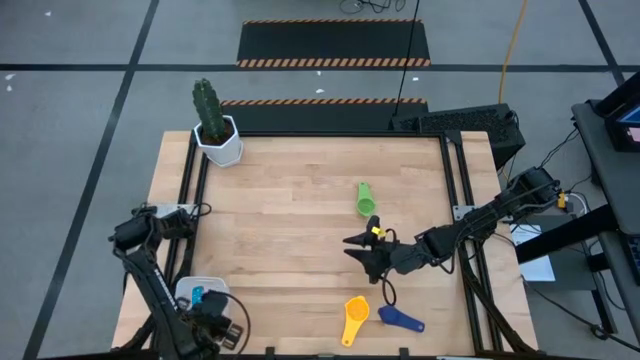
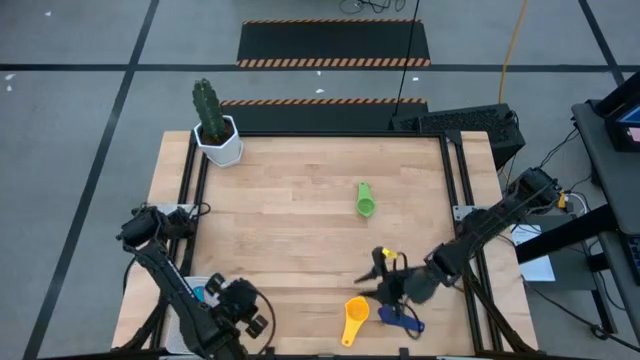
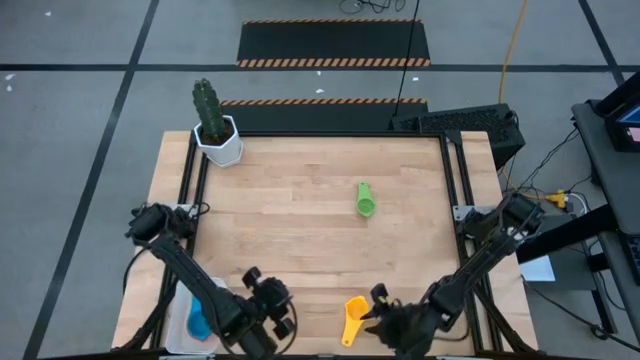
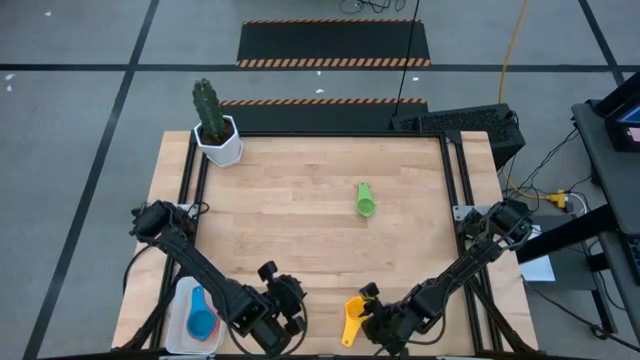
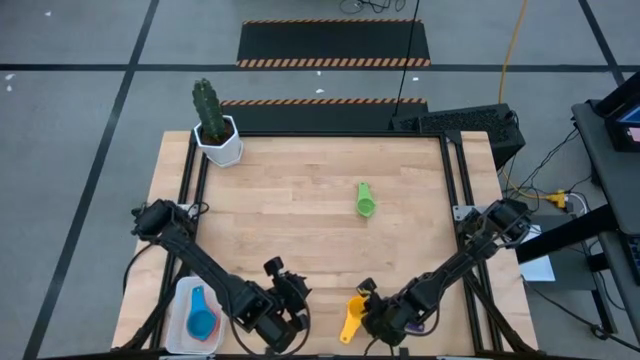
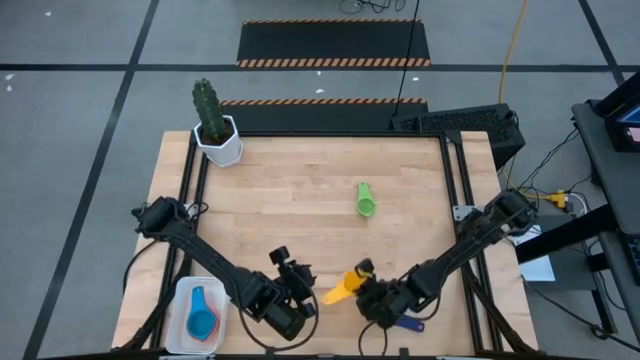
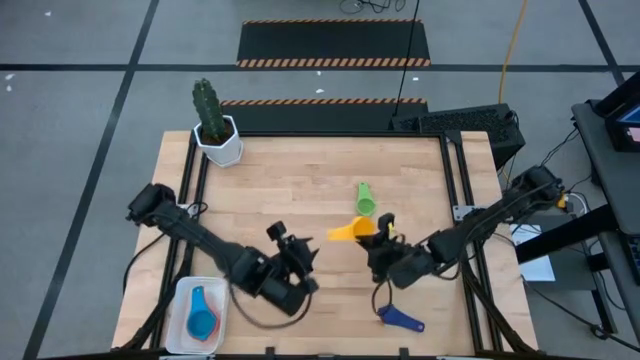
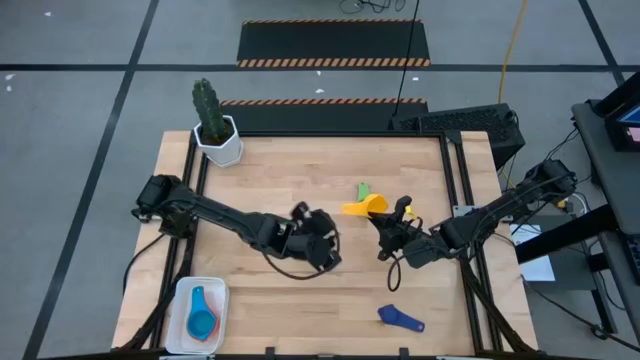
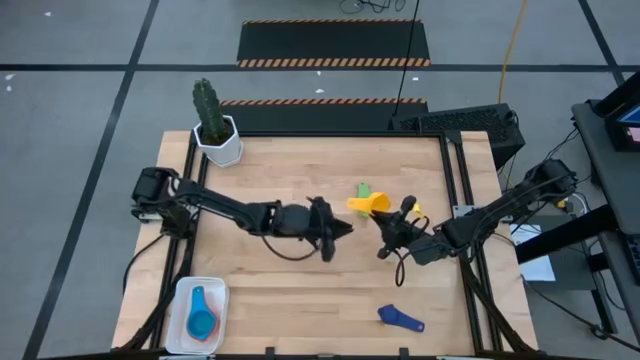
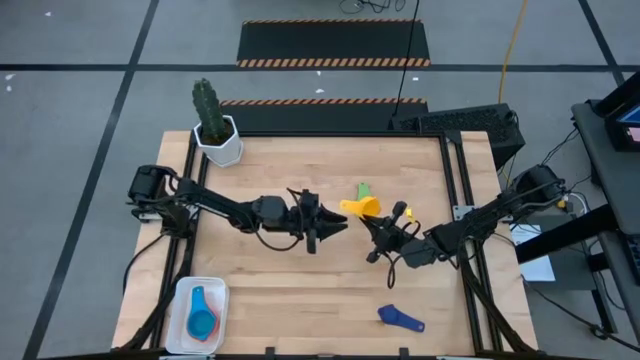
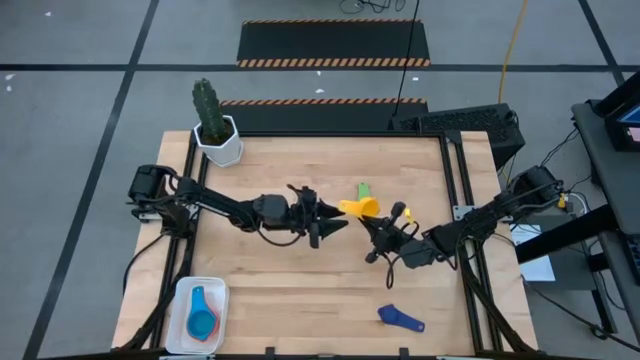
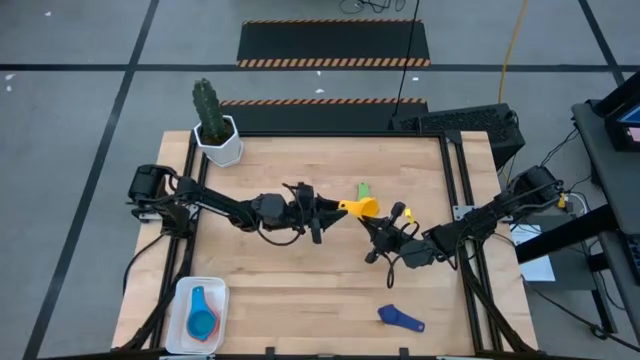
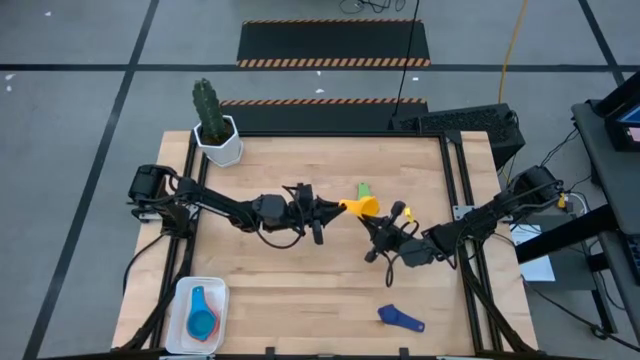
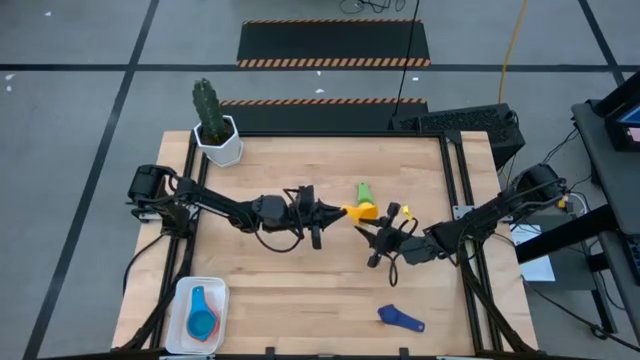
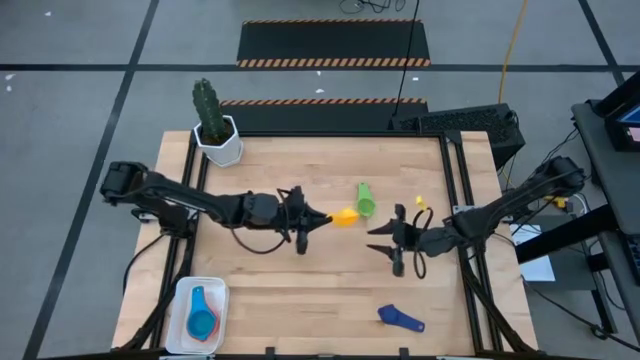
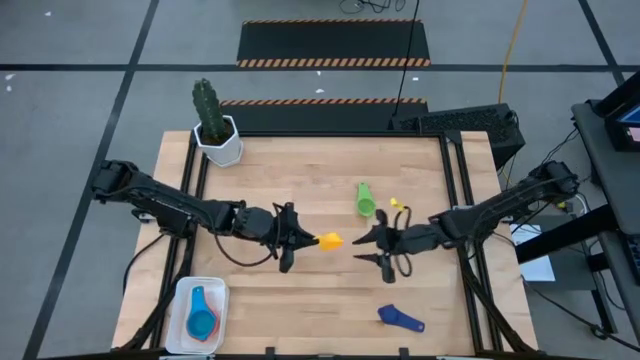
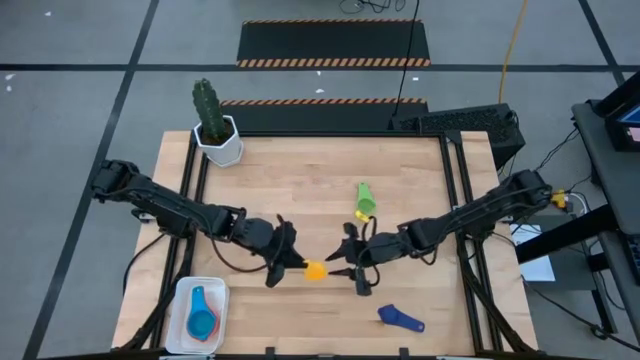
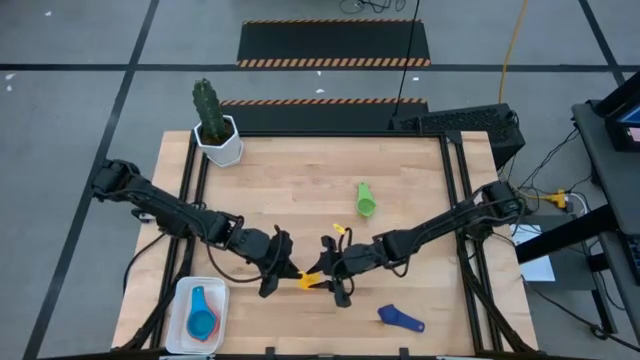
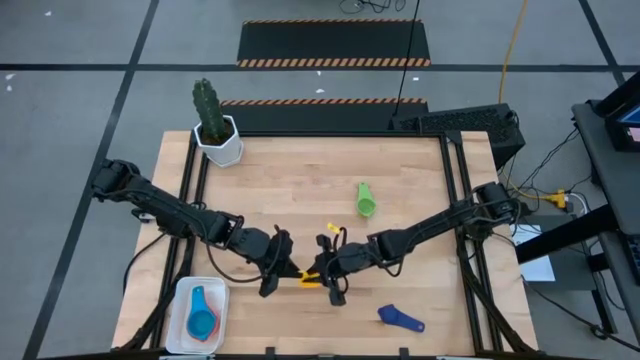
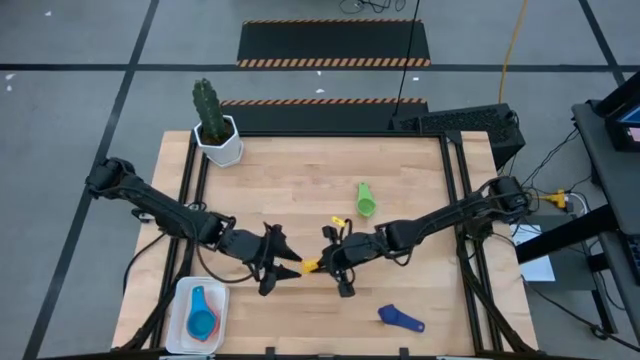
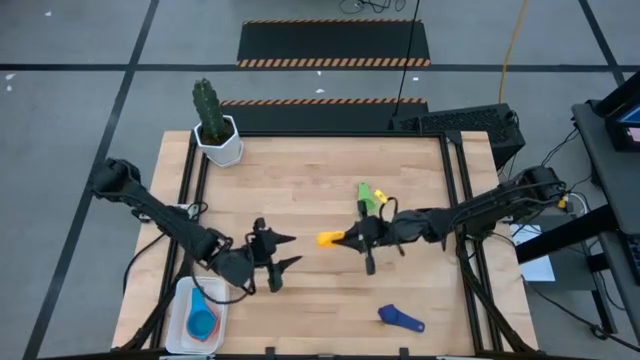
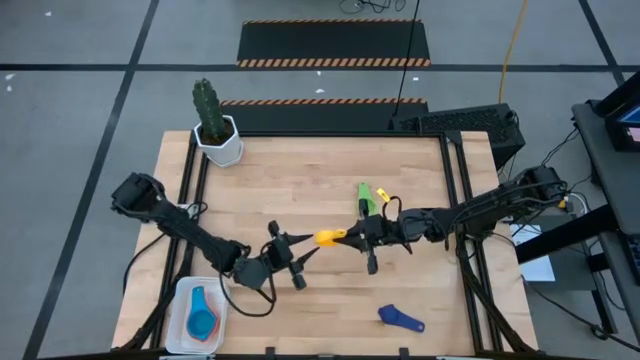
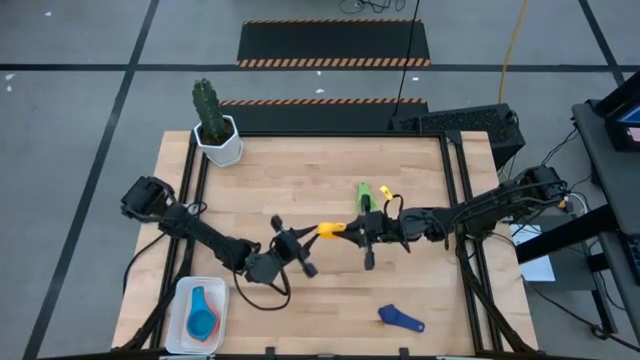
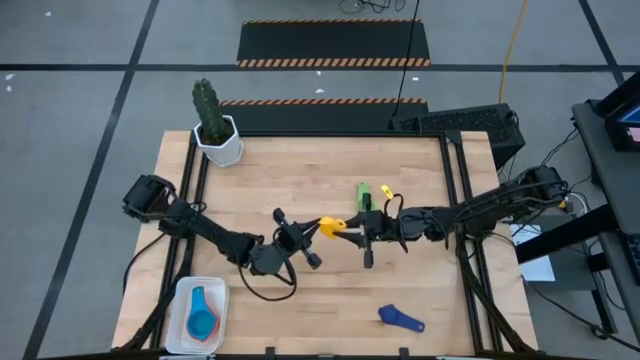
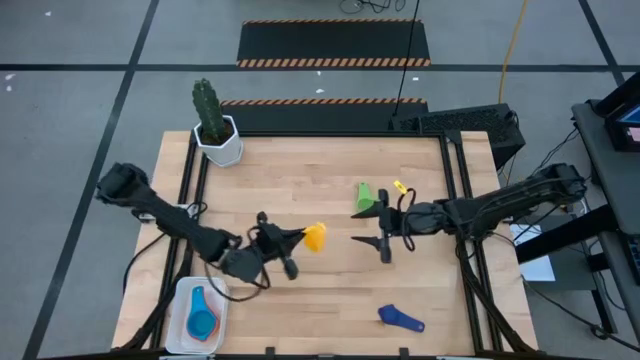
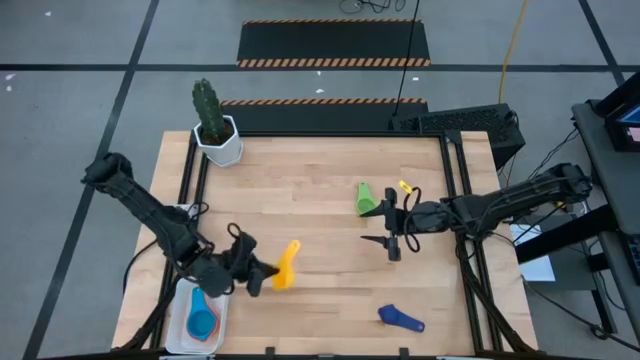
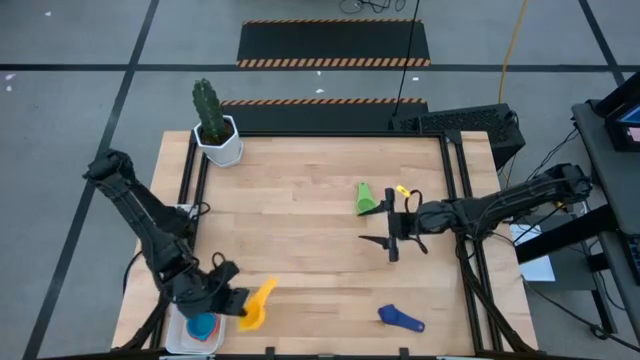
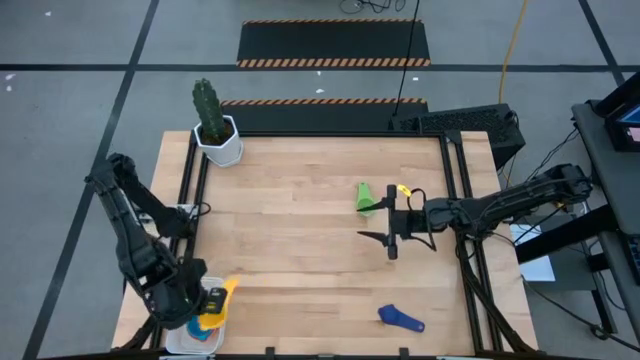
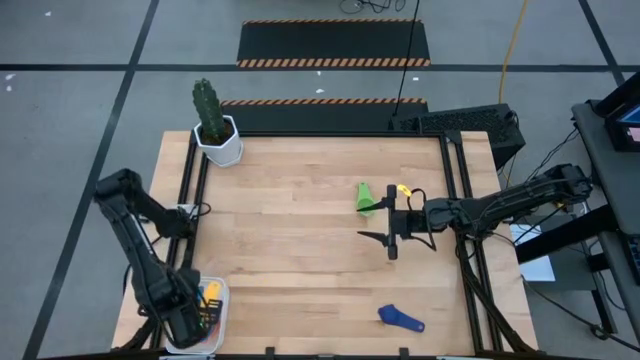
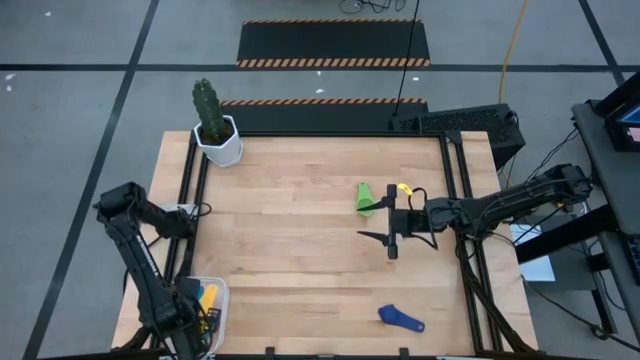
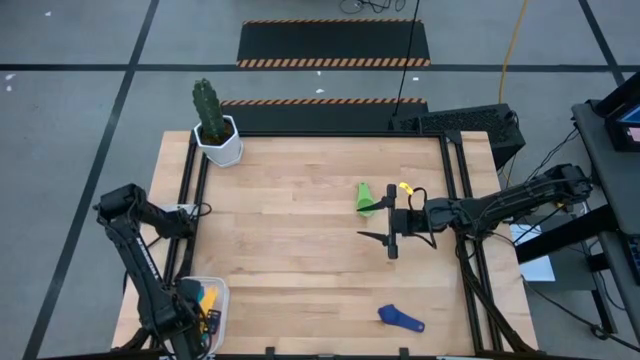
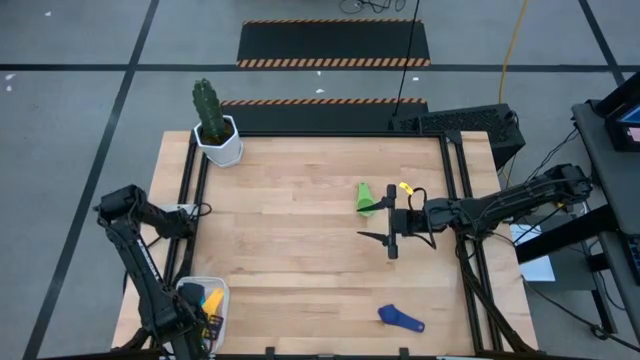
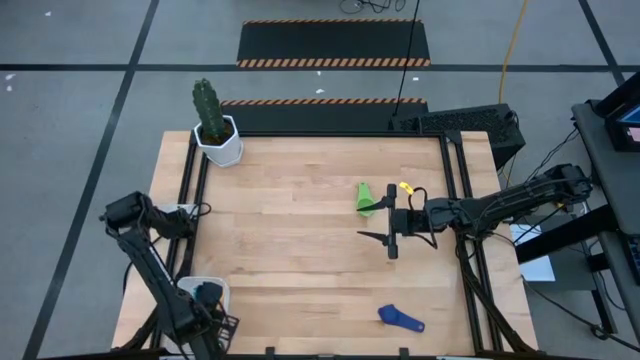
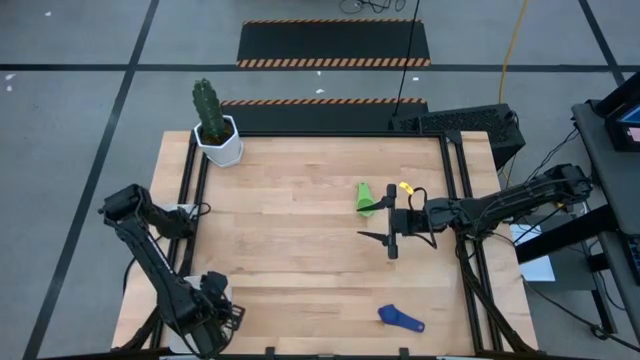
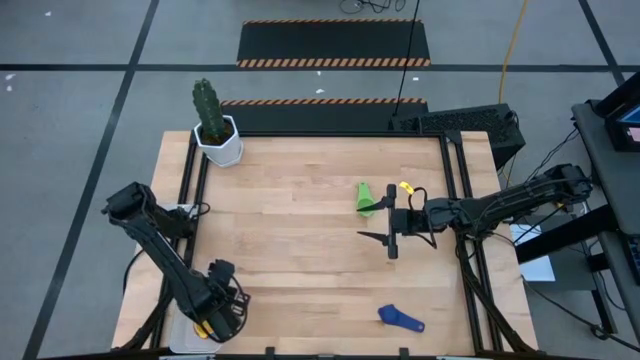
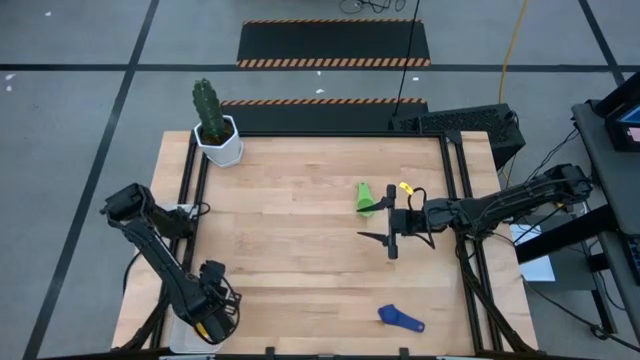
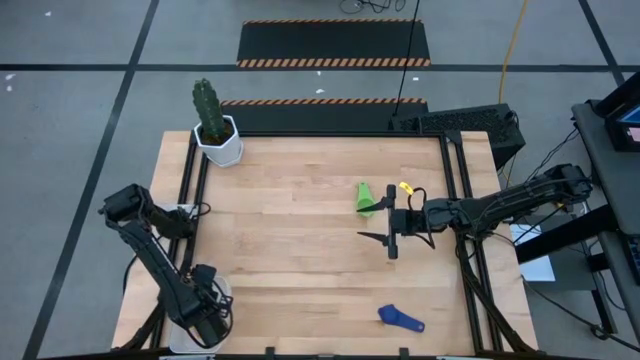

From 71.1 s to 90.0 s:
Task: Nest measuring cups in basket
Stack the yellow measuring cup on top of the light blue measuring cup into the white bin

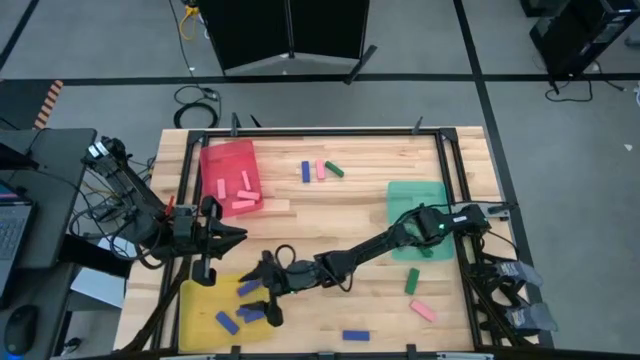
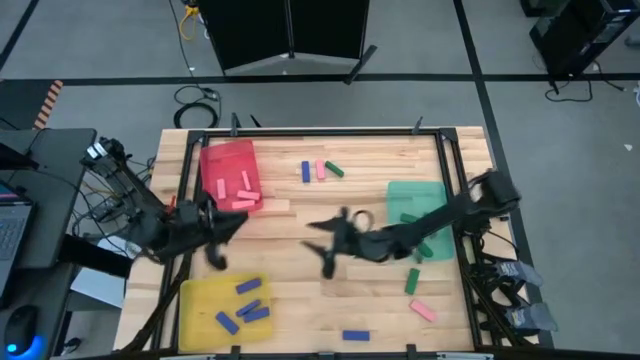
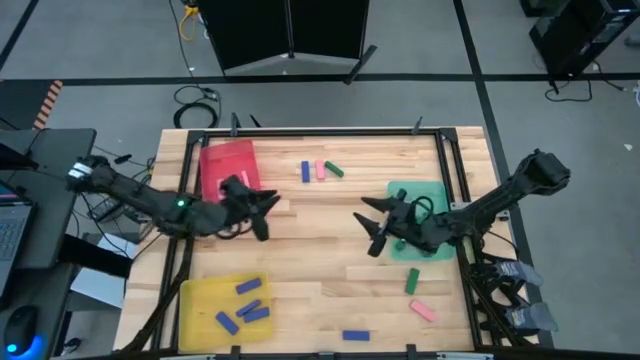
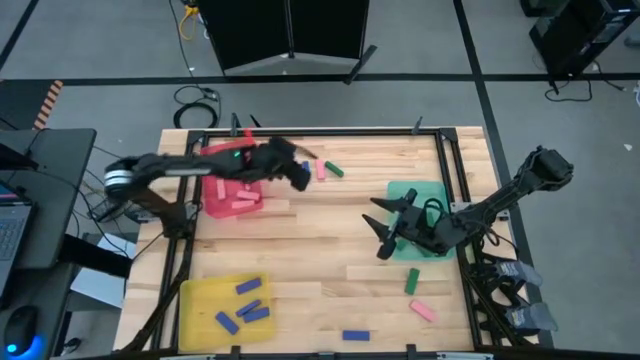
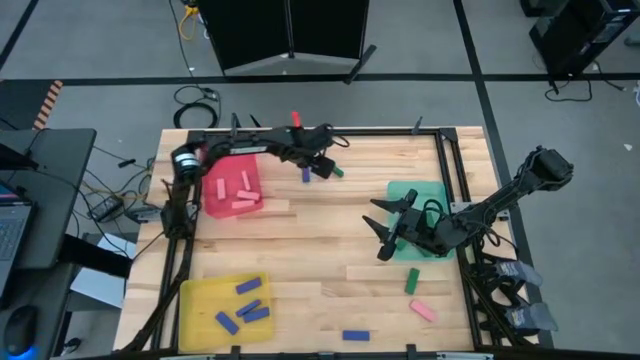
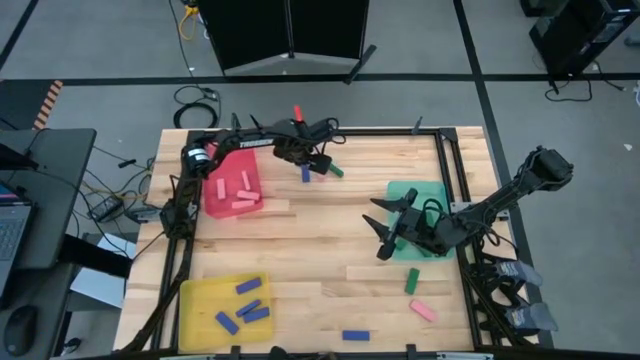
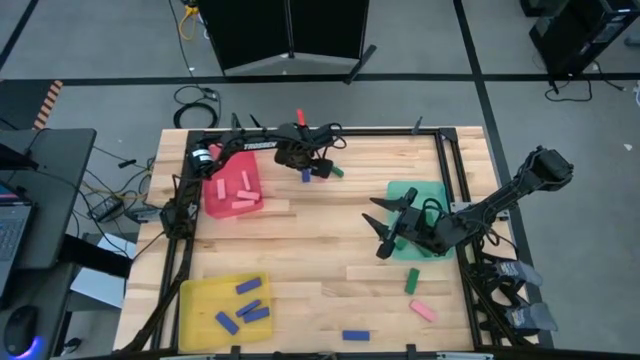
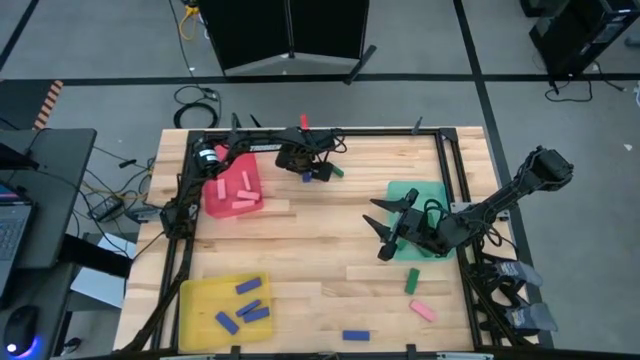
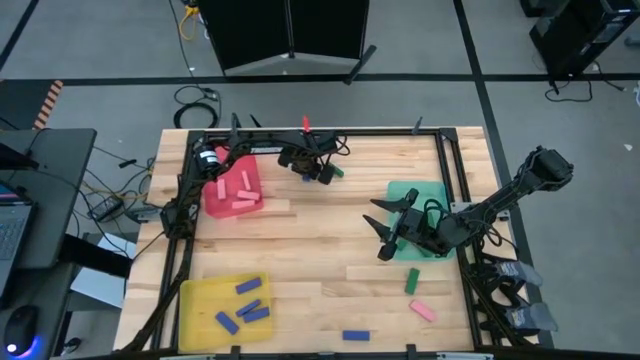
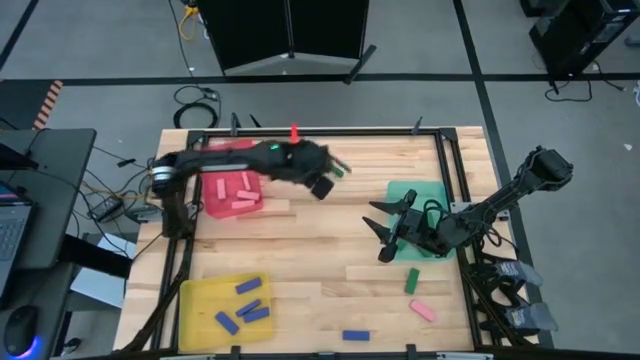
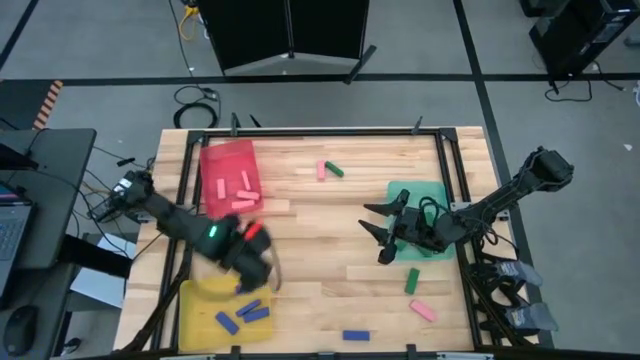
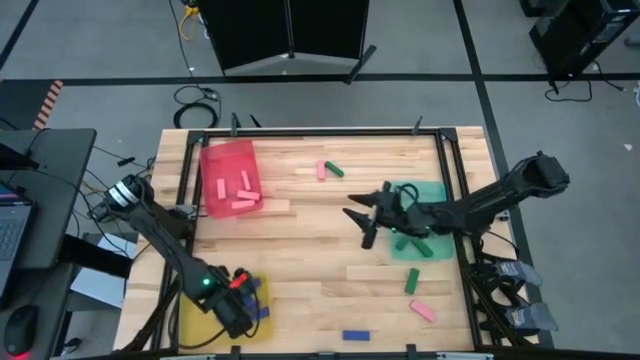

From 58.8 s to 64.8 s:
Task: Sort blocks
Put the blue block into the yellow bin
